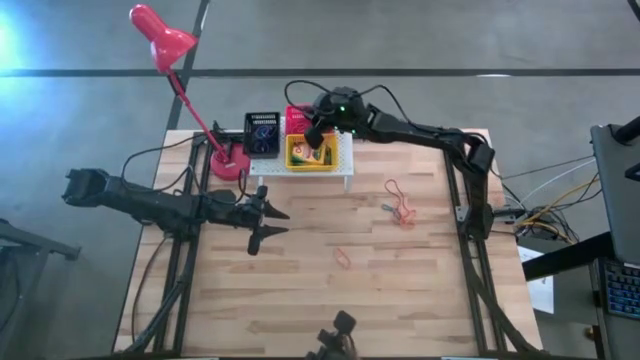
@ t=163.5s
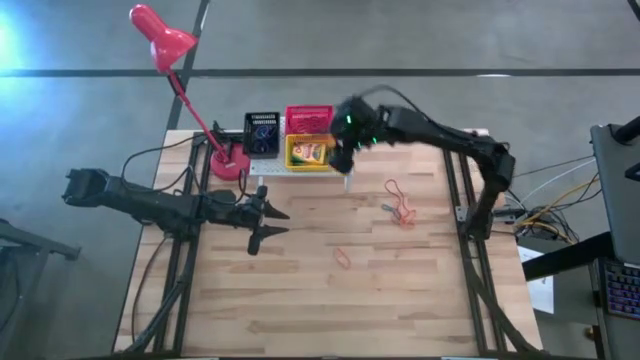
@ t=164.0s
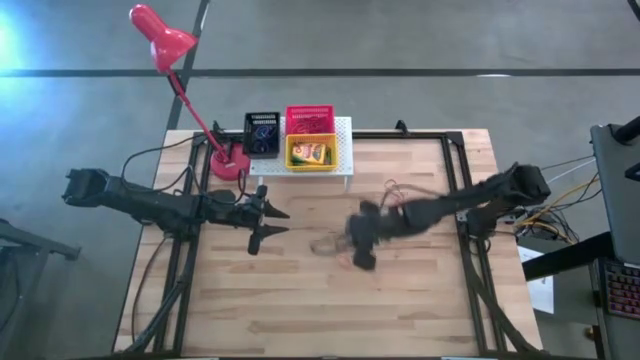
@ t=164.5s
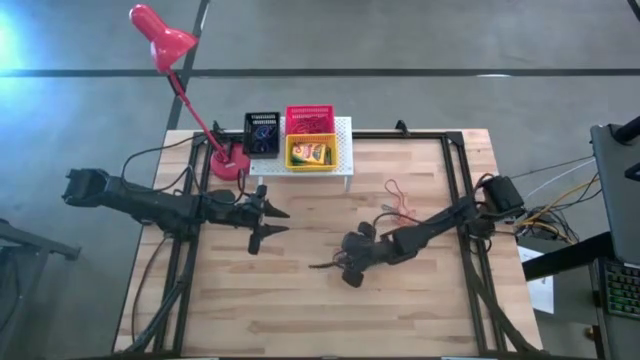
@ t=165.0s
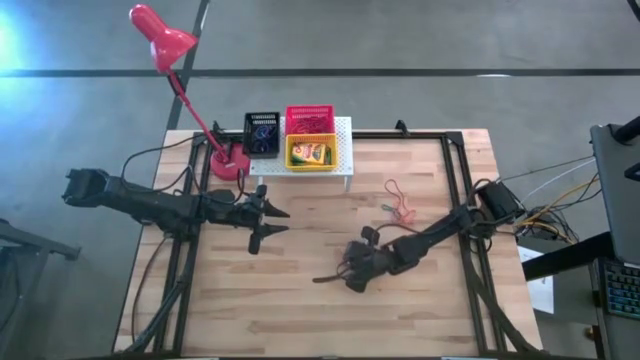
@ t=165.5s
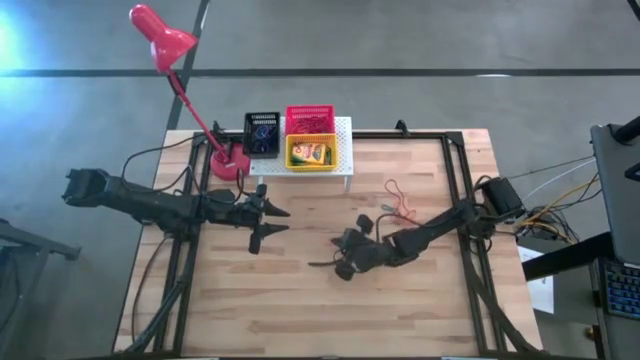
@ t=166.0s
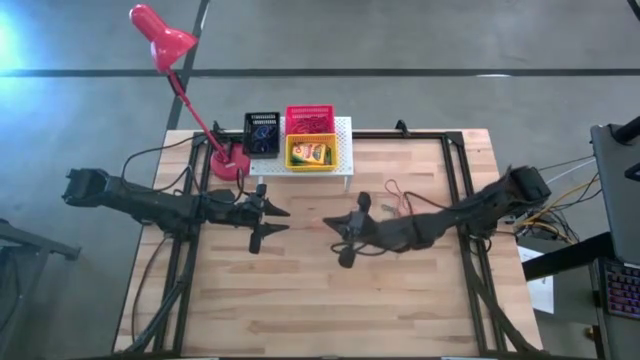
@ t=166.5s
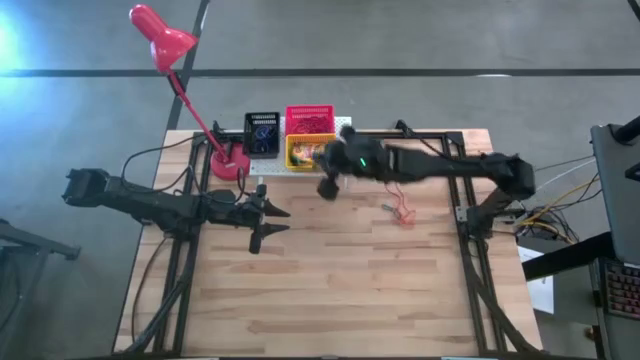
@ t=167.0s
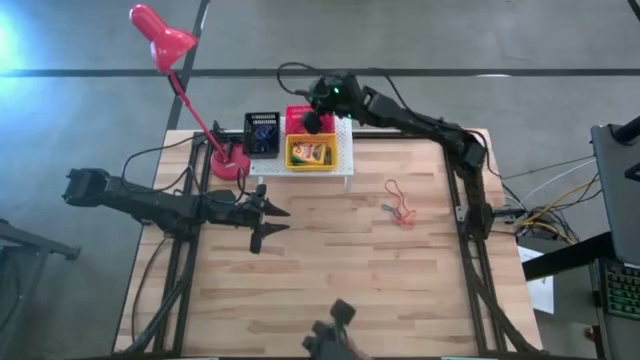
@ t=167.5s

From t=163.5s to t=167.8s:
Task: Pick & Place Office Desk Supplies
Put the orange rubber band into the red bin on the shelf

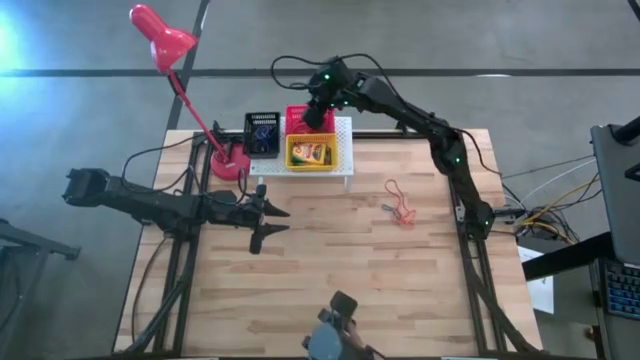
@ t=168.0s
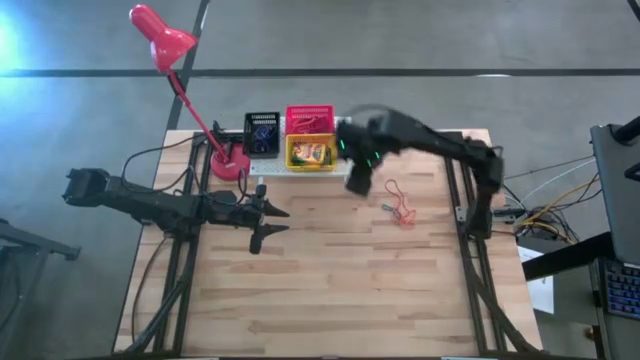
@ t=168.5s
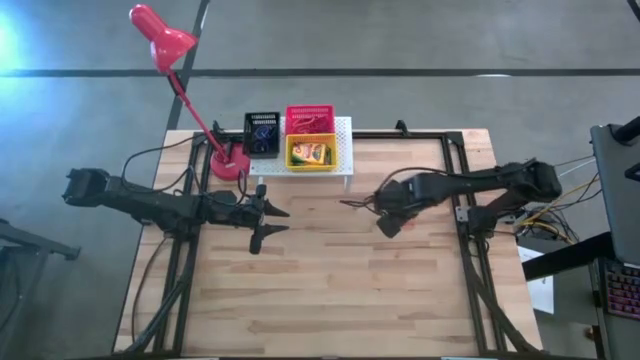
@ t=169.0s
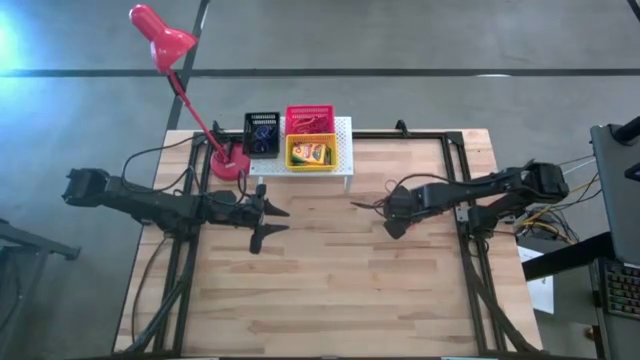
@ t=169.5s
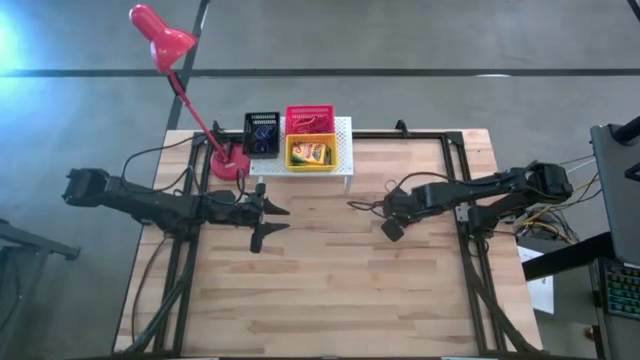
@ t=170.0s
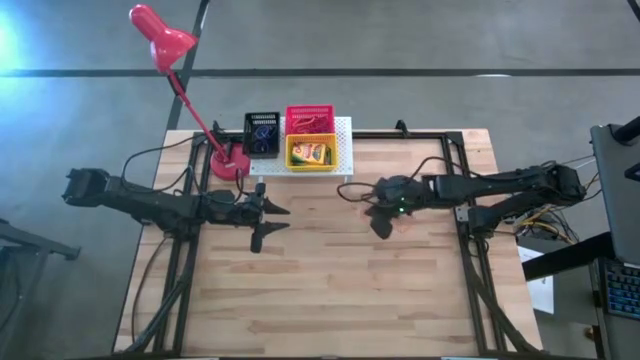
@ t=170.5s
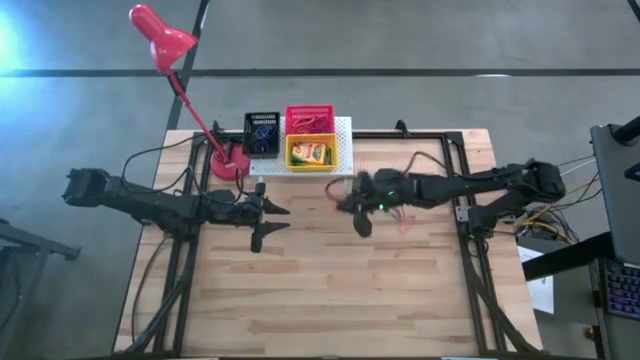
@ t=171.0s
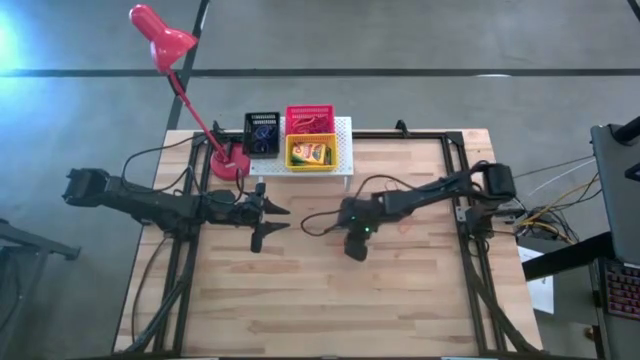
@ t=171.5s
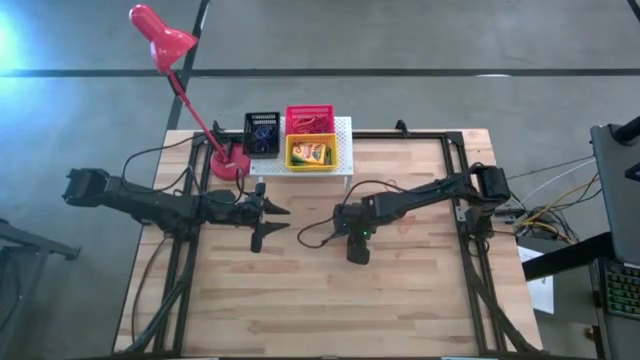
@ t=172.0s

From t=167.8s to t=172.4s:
Put the orange rubber band into the red bin on the shelf

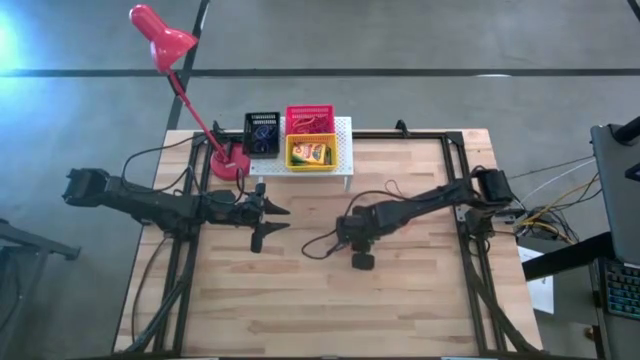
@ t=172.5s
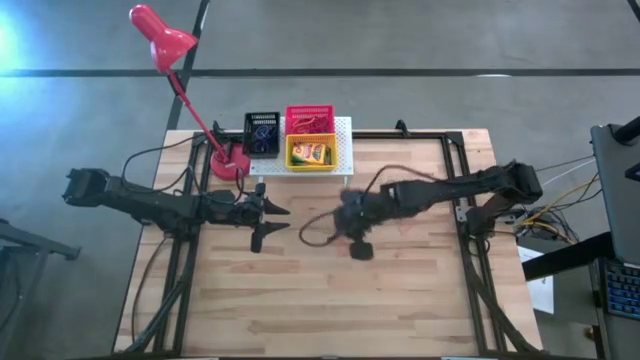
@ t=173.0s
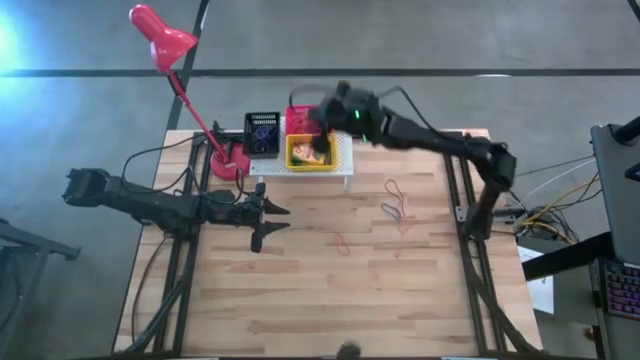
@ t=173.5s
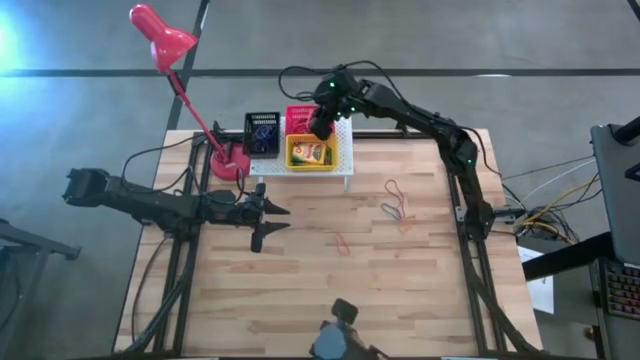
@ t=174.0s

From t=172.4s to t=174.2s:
Put the orange rubber band into the red bin on the shelf

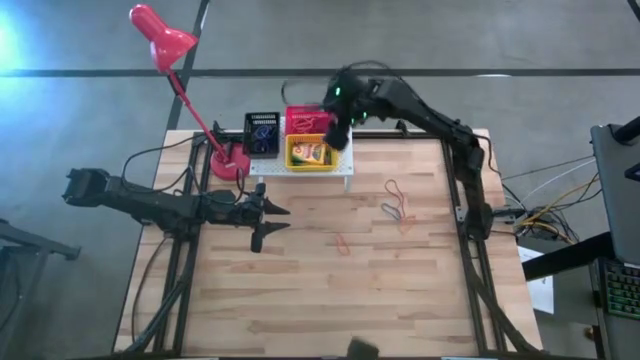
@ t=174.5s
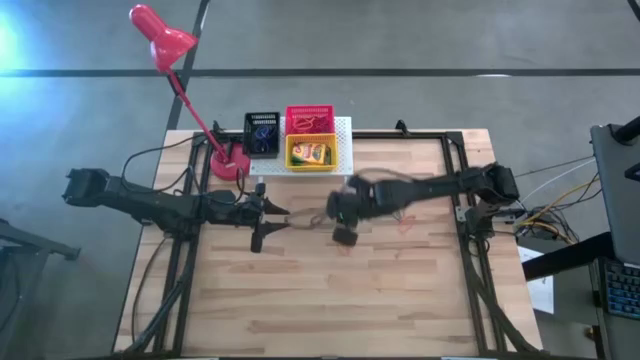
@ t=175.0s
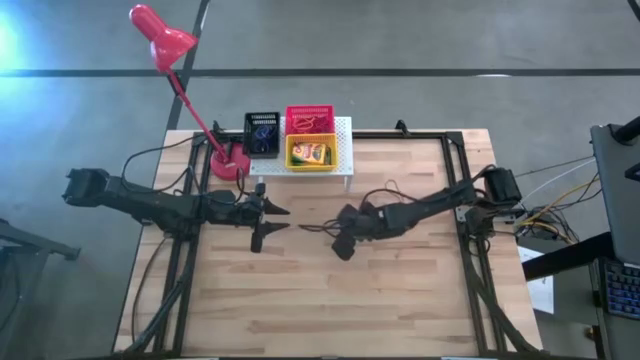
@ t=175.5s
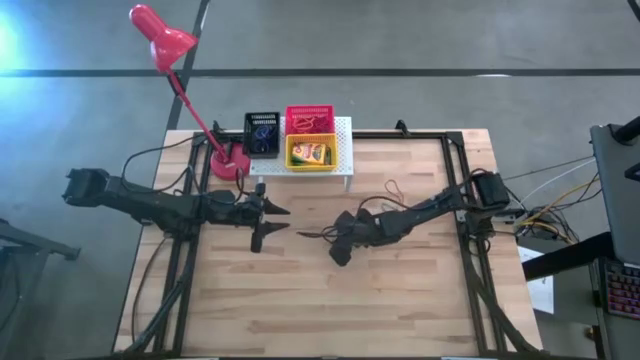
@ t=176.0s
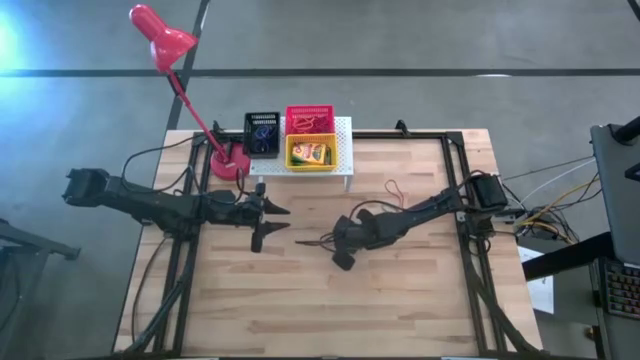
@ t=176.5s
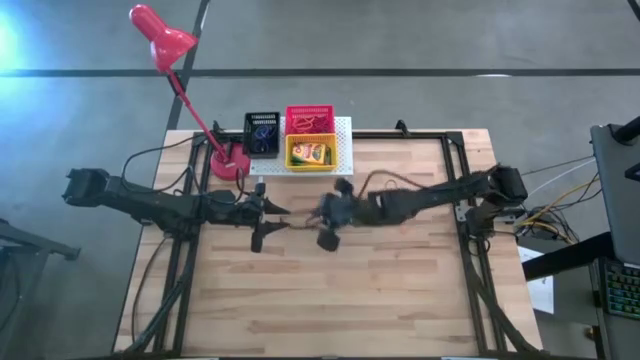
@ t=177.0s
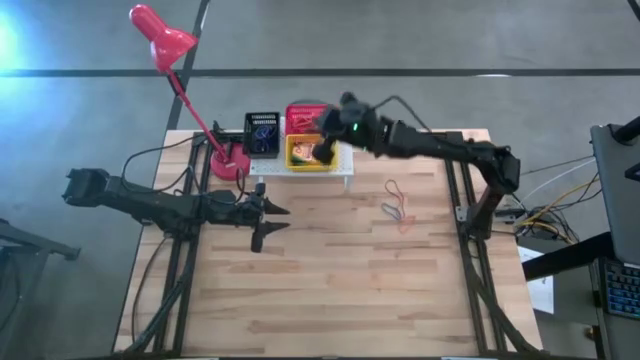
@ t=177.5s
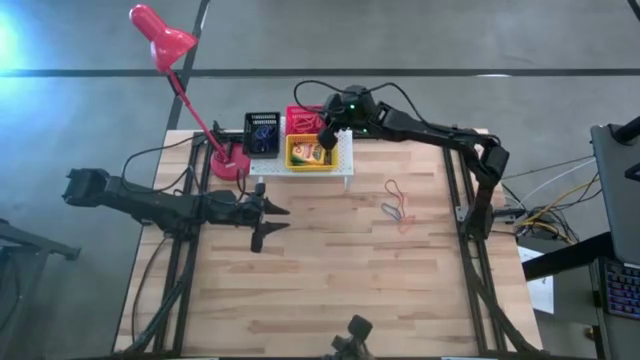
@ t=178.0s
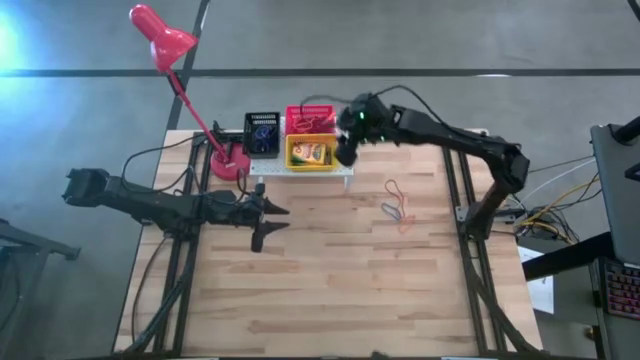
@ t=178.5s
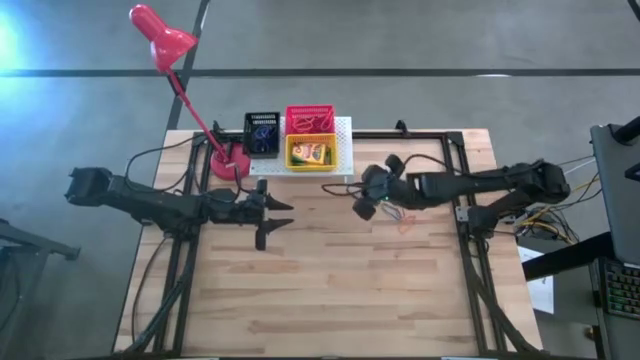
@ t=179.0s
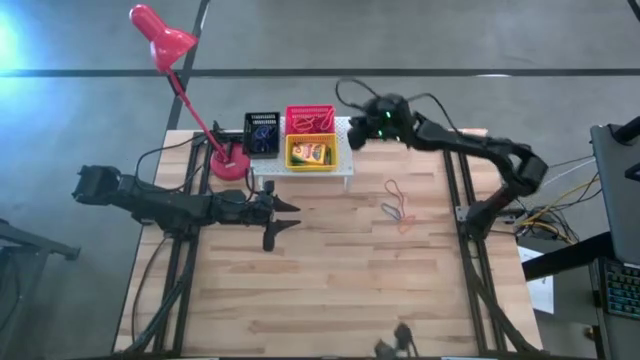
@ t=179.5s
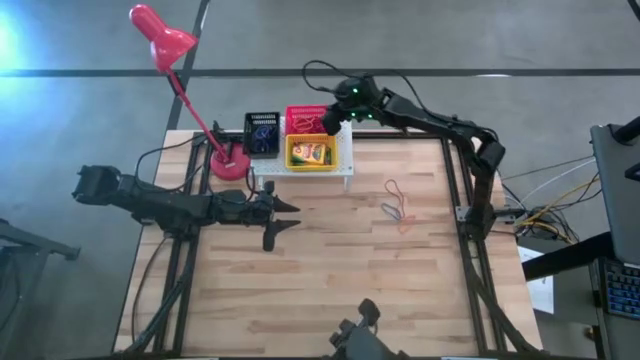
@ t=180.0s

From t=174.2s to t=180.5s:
Put the orange rubber band into the red bin on the shelf

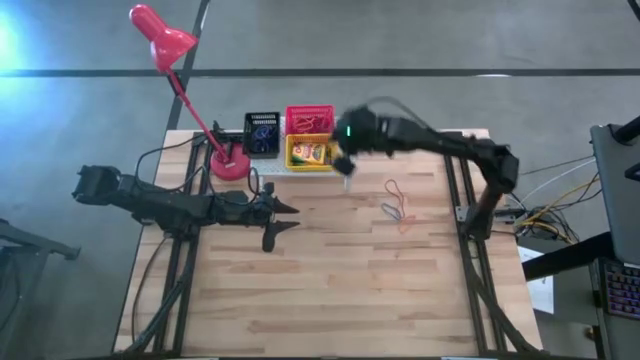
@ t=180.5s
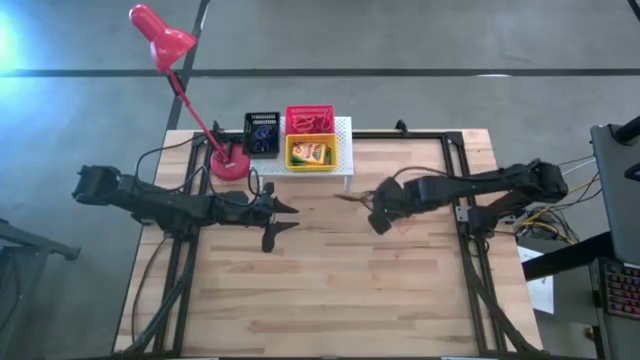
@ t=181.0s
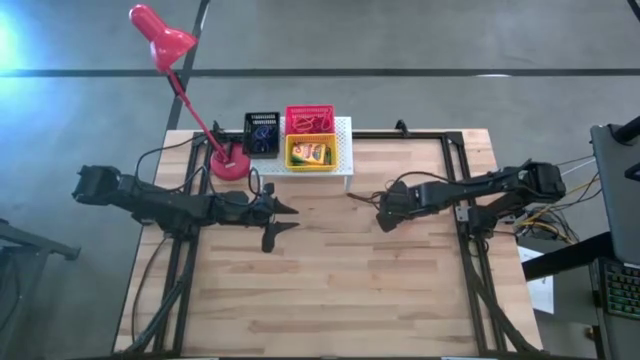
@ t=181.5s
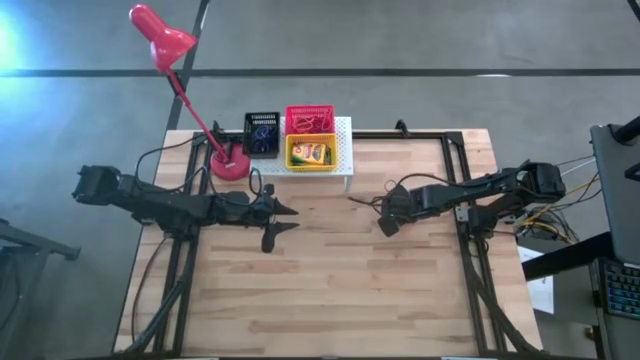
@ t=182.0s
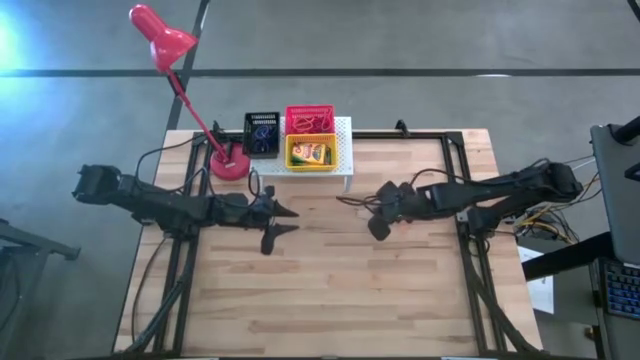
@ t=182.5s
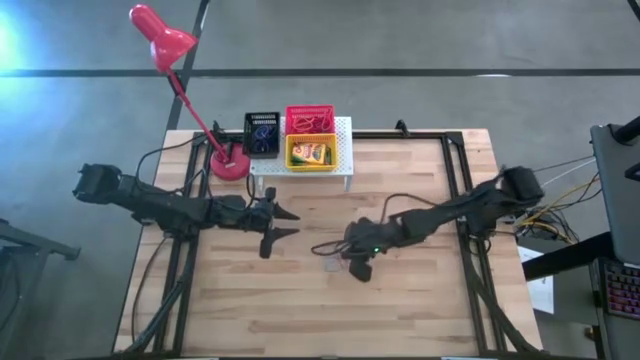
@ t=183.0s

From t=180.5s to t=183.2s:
Put the red rubber band into the red bin on the shelf

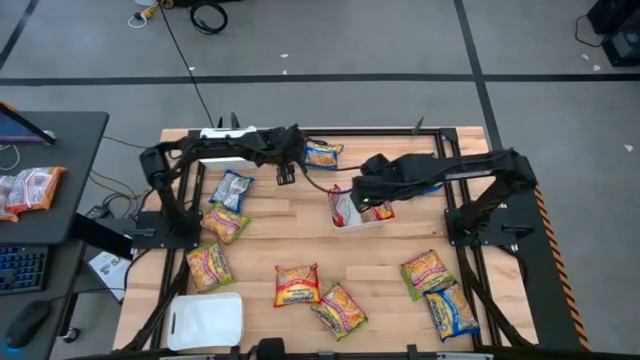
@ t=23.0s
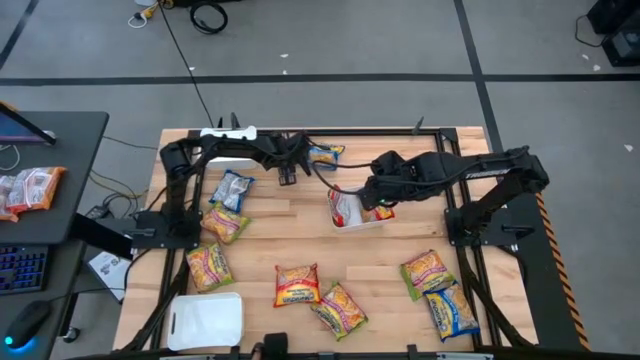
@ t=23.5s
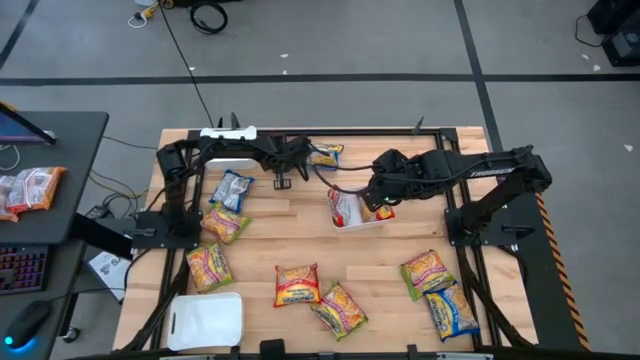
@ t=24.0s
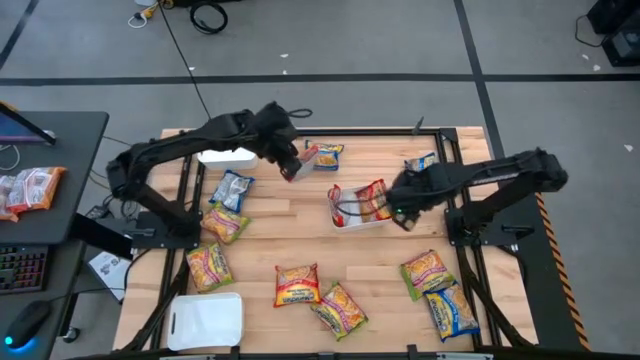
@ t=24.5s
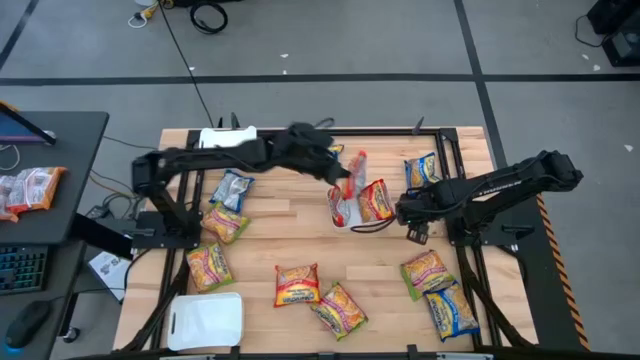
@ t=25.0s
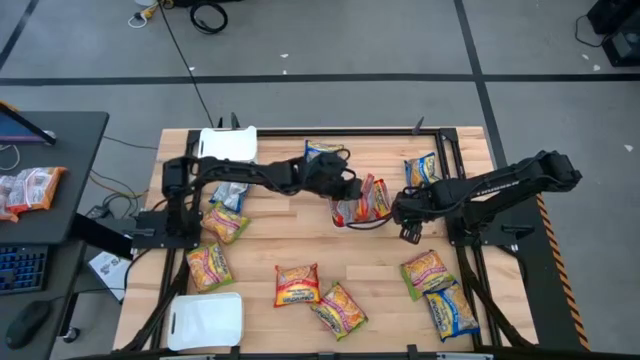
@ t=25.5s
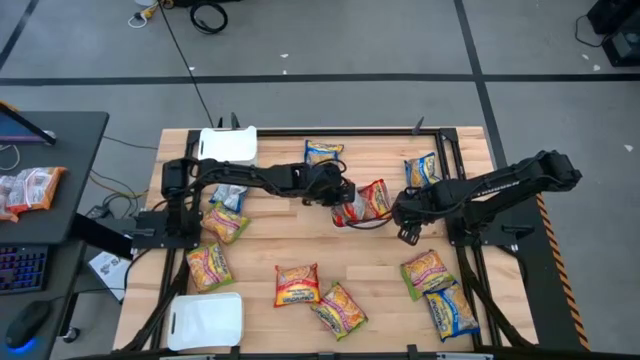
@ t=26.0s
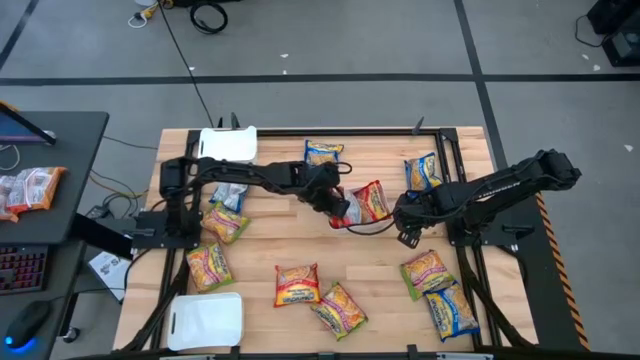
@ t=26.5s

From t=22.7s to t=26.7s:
Task: Sort Maruchan noodles
Put the orange noodle pack into the middle white bin
